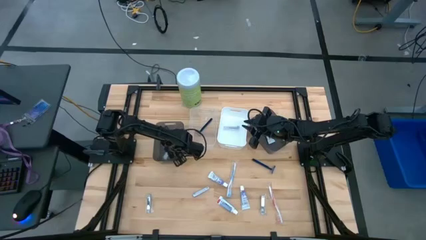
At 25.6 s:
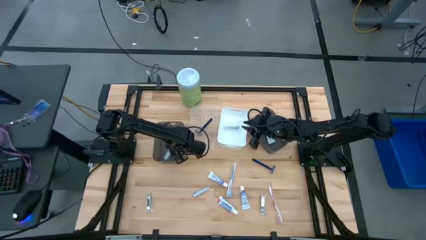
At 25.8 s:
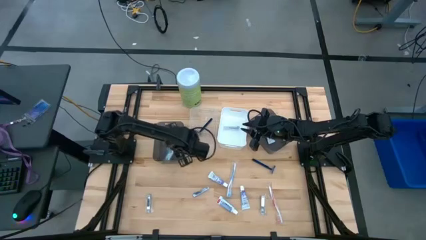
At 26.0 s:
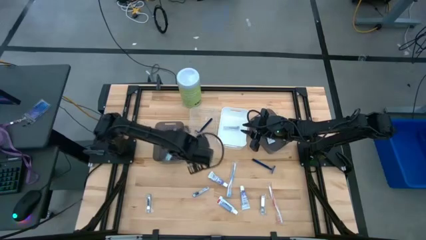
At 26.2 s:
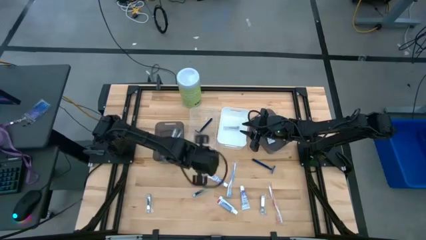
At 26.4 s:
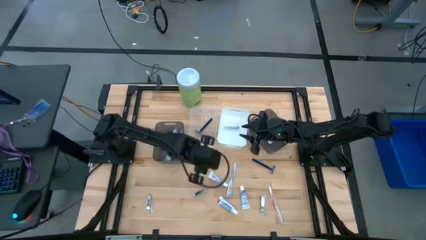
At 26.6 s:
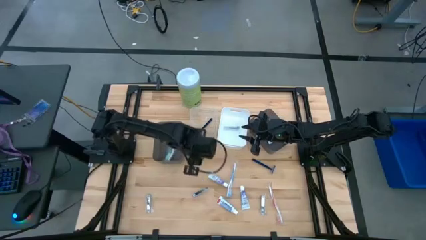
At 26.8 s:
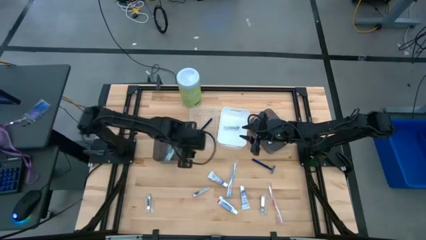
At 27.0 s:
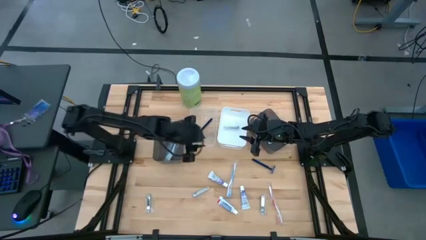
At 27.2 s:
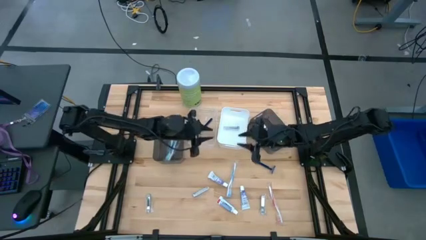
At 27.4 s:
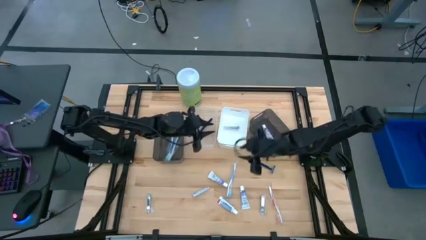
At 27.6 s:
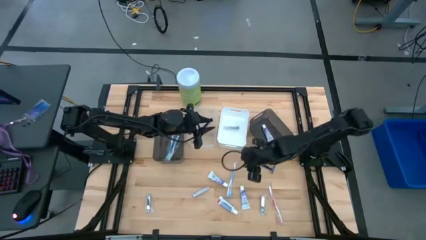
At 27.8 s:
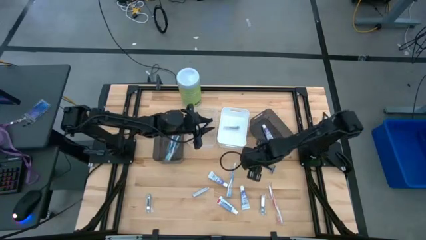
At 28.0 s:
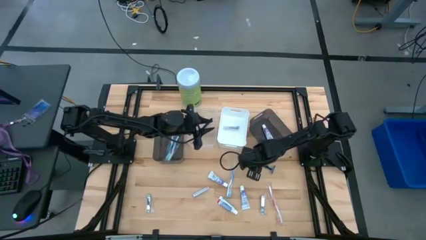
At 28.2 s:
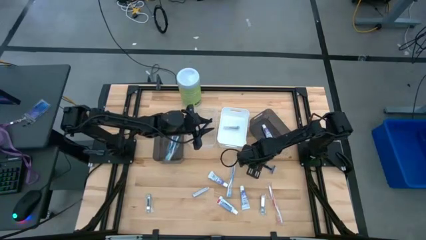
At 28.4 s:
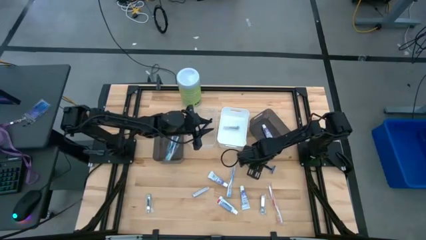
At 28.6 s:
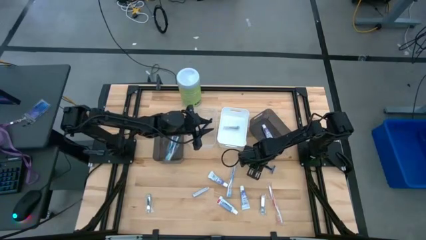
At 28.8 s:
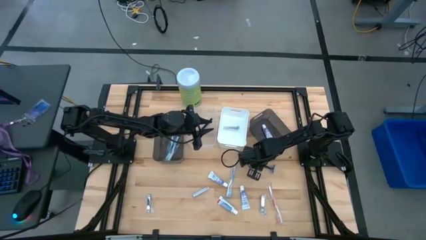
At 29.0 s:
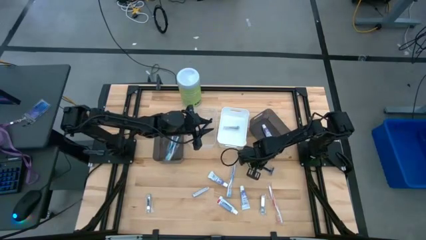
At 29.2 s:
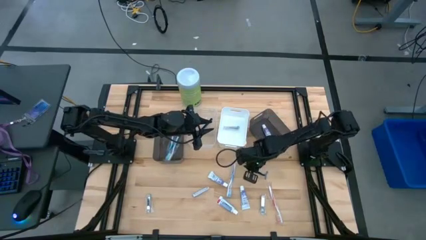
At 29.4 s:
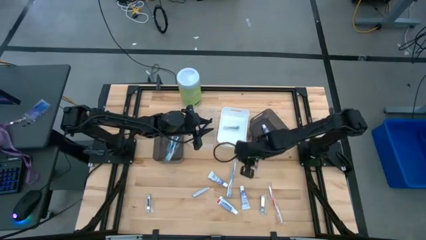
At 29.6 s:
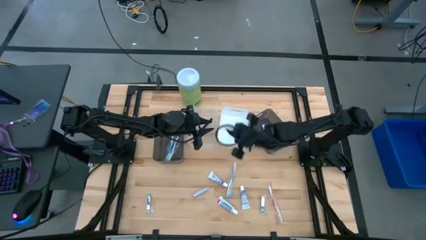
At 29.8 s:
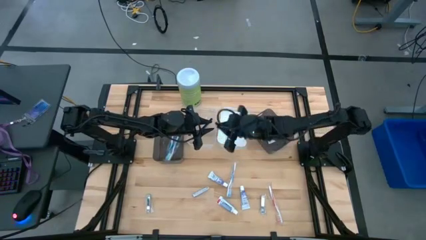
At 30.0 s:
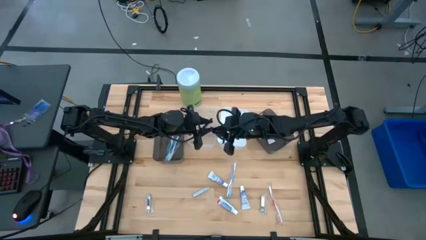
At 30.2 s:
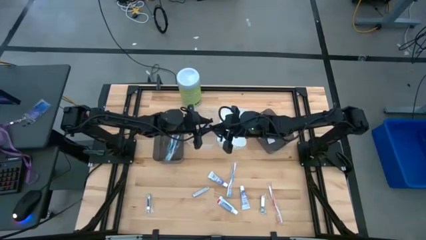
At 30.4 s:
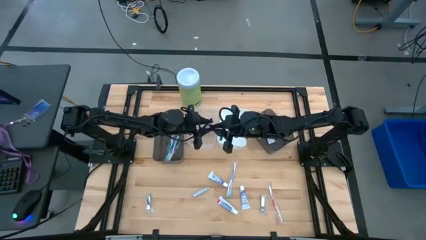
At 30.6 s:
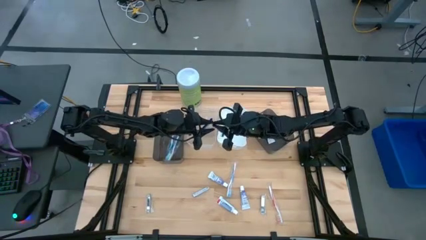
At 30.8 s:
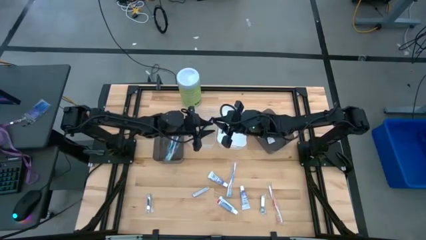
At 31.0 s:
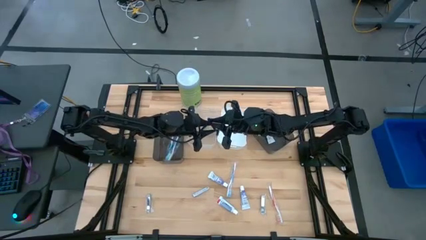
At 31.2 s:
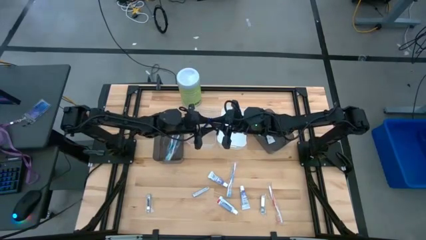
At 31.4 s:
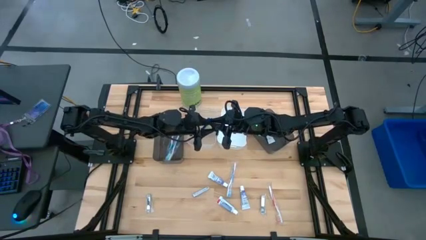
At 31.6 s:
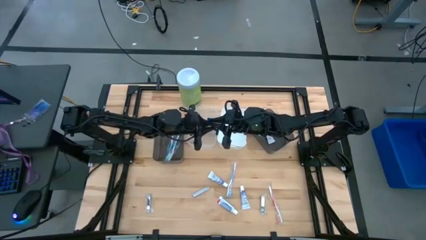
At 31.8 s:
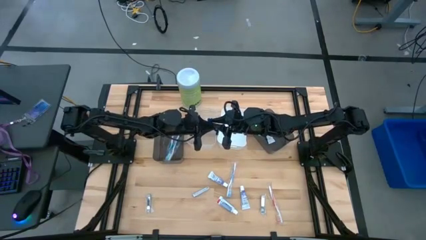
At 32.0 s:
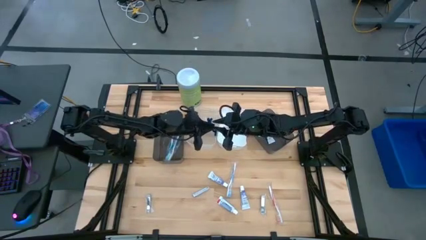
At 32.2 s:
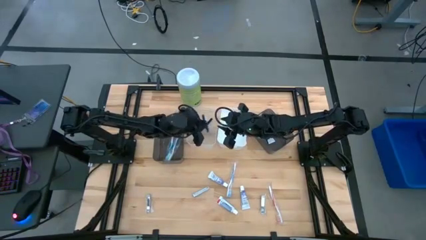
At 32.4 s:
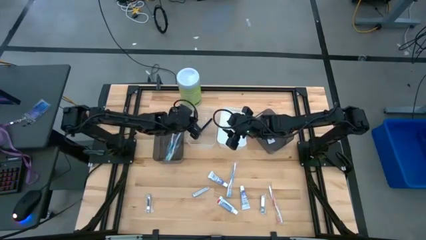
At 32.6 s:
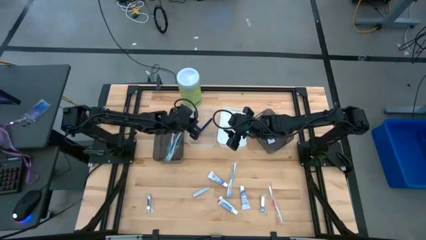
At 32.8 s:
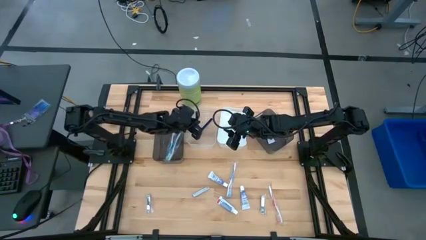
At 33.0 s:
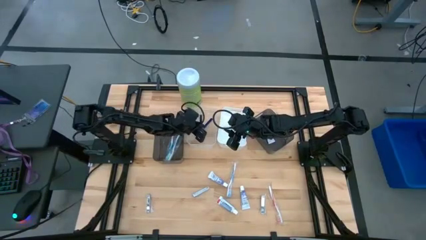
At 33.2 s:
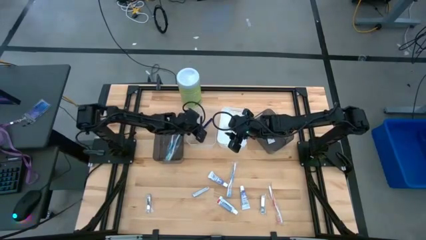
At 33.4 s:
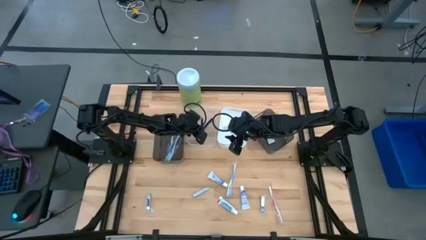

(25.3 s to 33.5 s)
Task: Pick & Place Travel size toiletries
Put the blue razor into the transparent bin

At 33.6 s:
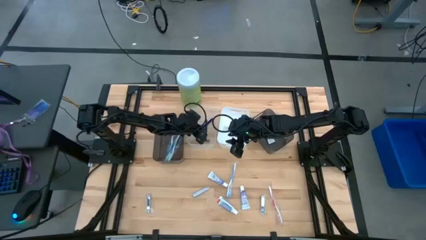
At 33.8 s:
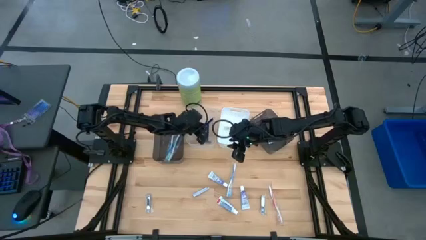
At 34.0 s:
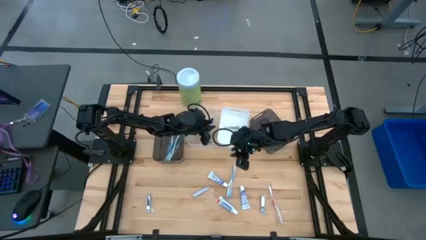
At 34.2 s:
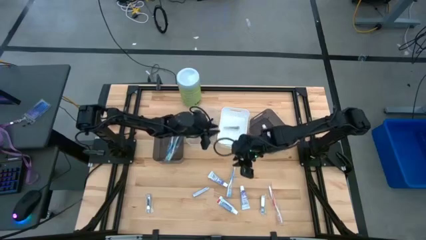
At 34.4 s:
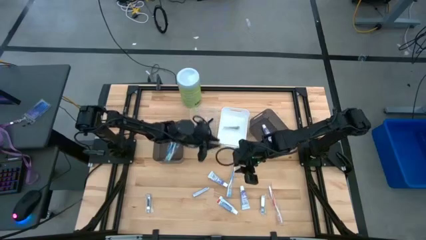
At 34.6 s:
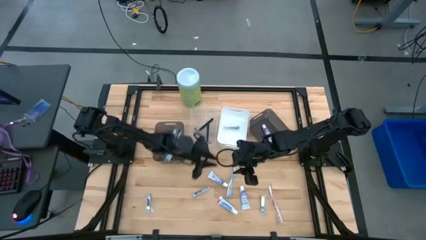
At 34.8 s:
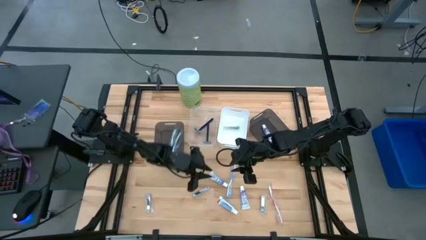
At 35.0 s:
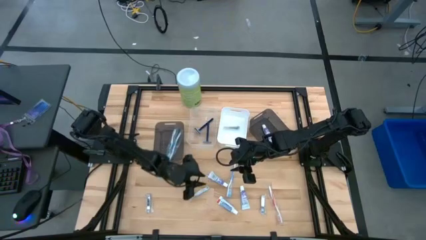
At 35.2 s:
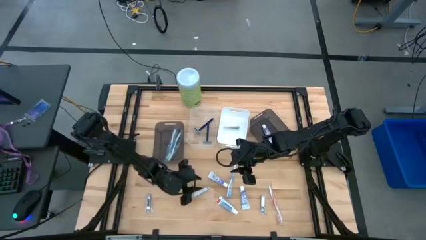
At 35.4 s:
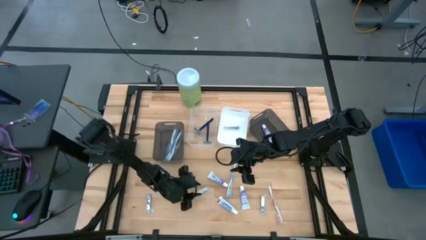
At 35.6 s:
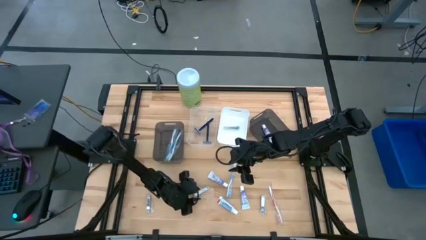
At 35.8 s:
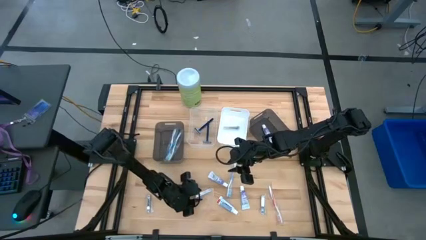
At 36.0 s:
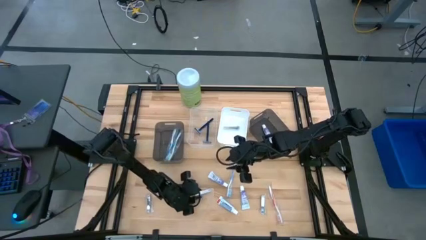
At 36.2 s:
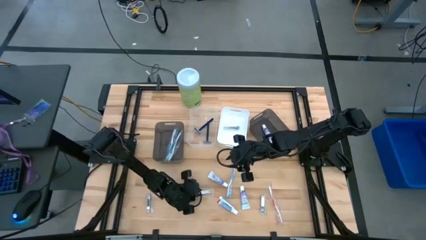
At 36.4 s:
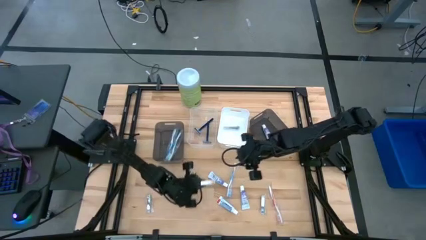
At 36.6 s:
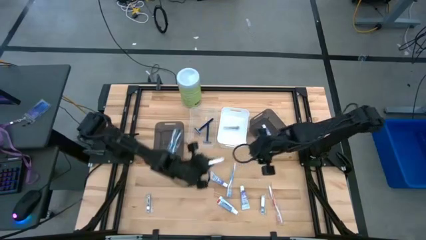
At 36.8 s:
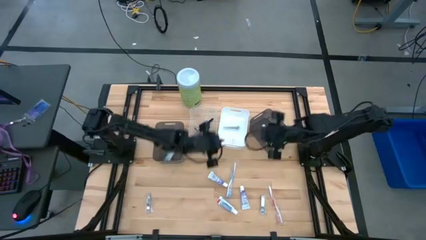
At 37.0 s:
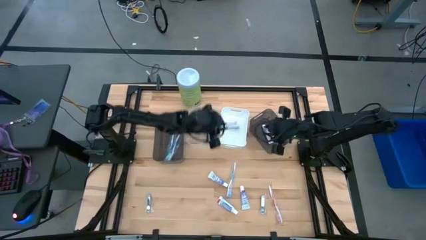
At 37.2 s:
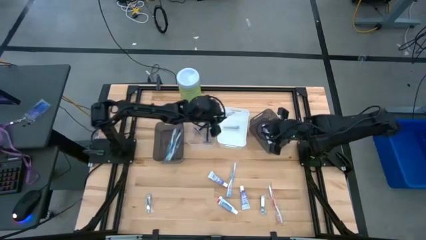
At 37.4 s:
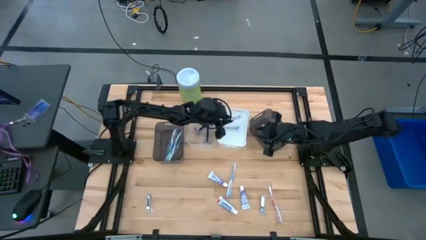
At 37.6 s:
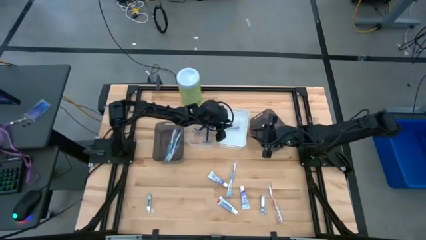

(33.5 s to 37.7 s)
Put the silver nail cutter into the white bin

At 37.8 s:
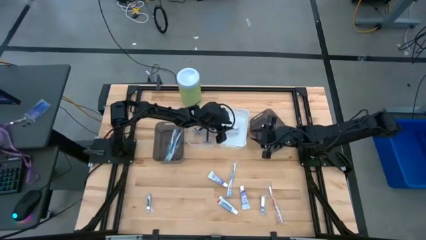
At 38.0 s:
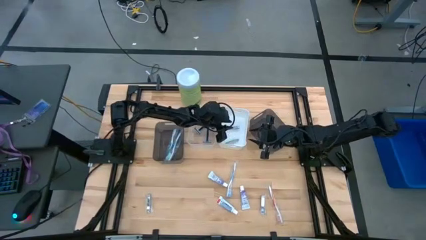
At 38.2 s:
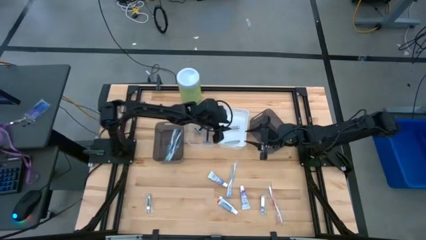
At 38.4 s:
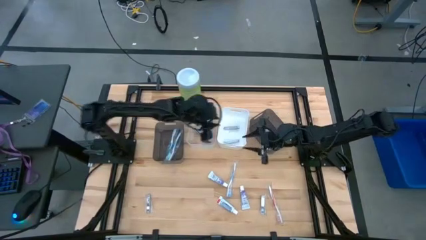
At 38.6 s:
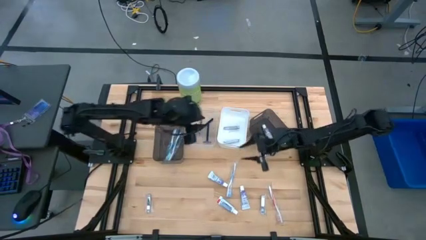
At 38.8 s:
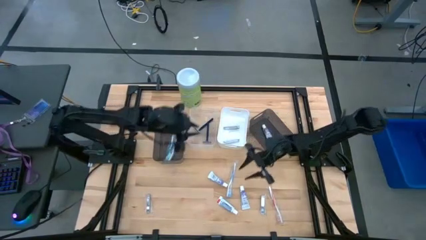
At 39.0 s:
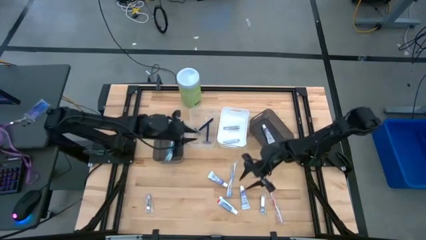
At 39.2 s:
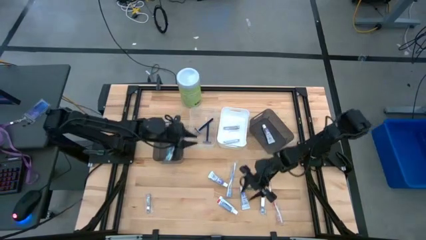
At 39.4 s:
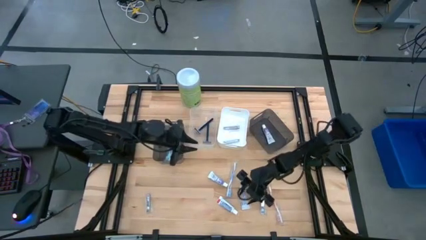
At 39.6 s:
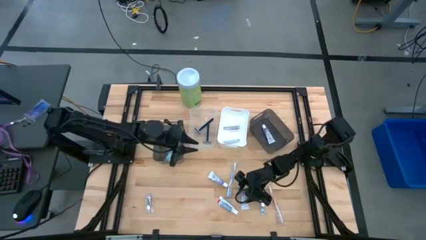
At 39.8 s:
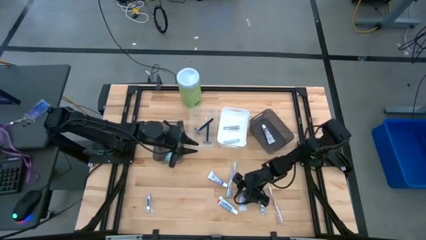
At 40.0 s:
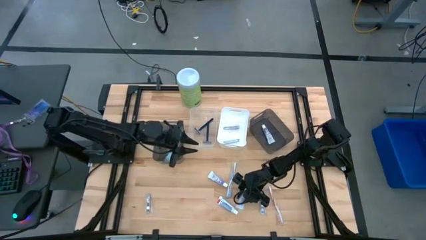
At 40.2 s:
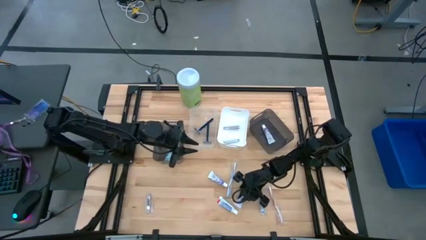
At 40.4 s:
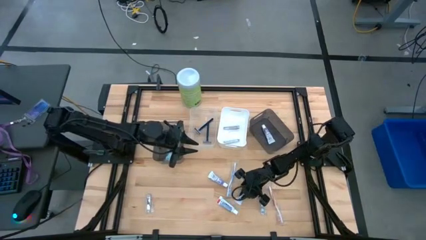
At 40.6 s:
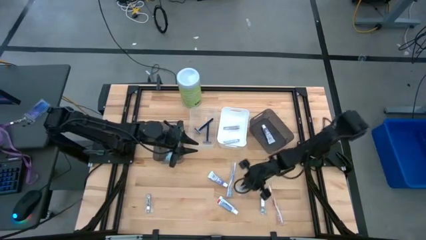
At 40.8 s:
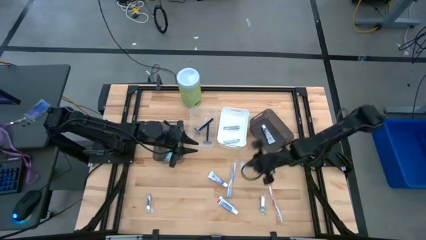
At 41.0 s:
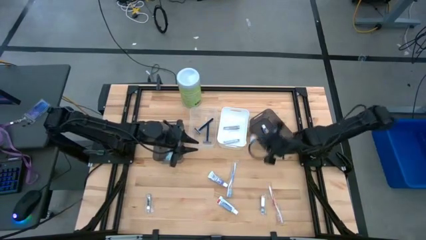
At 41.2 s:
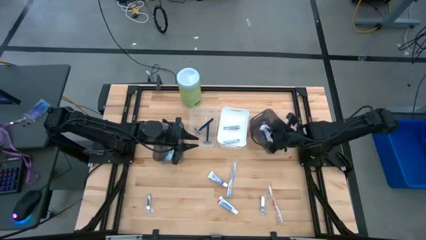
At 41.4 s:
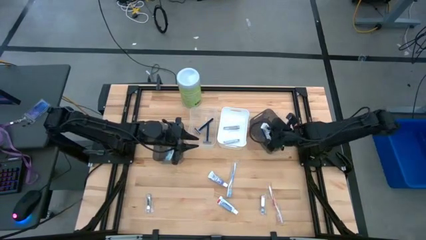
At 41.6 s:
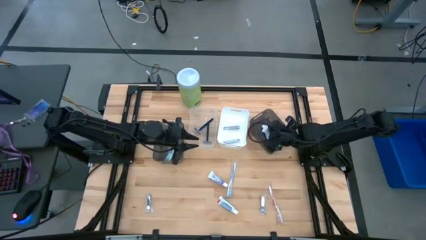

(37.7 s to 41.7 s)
Put the purple toothpaste into the right black bin
